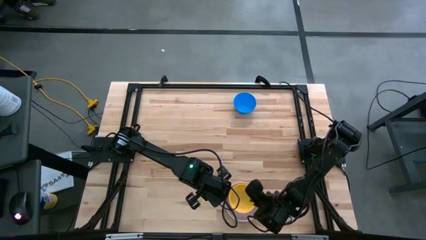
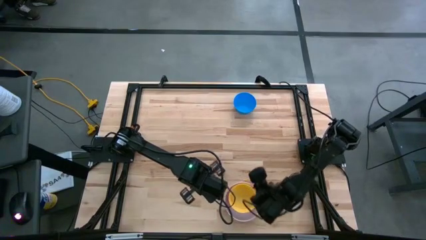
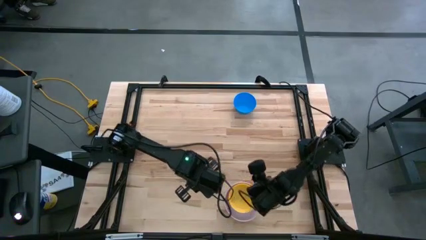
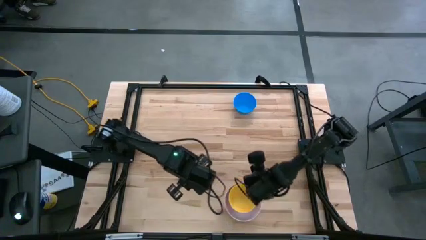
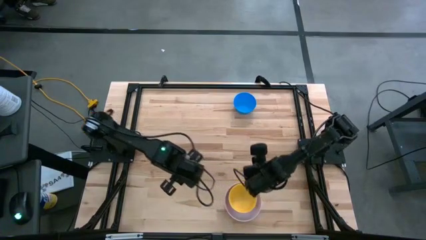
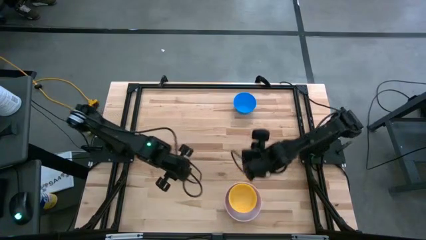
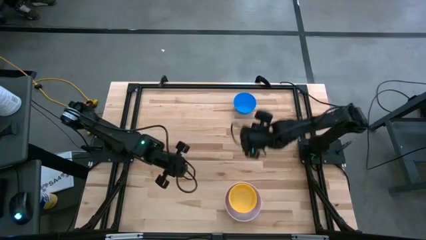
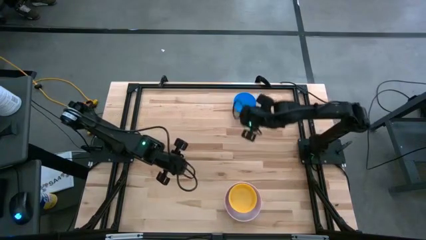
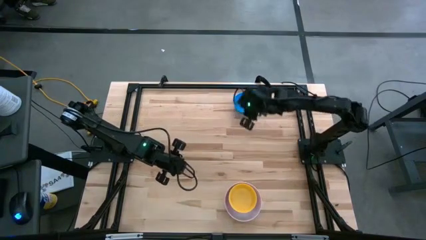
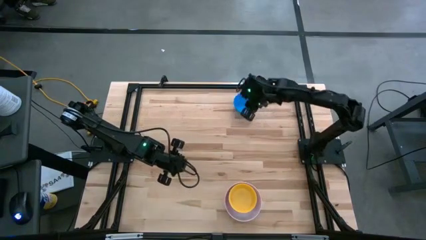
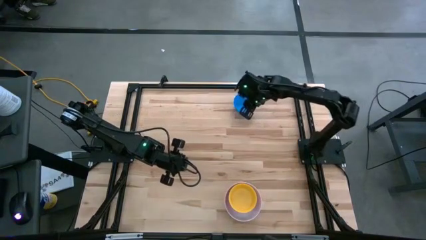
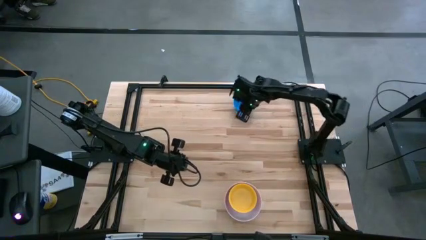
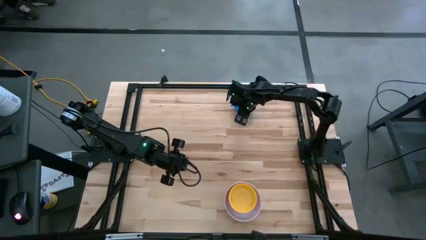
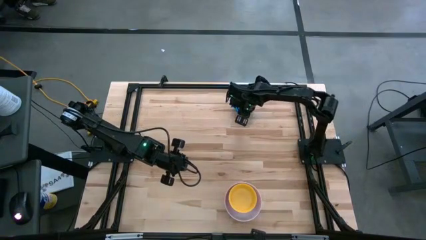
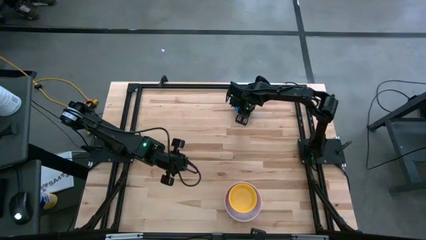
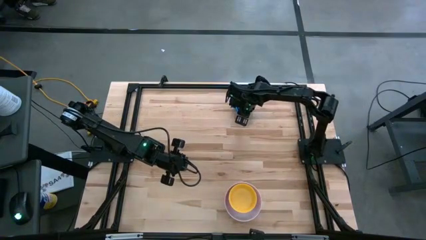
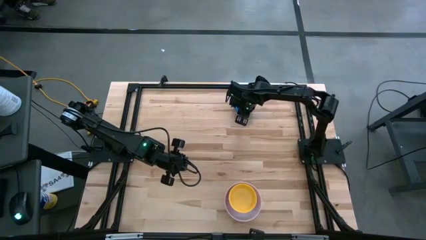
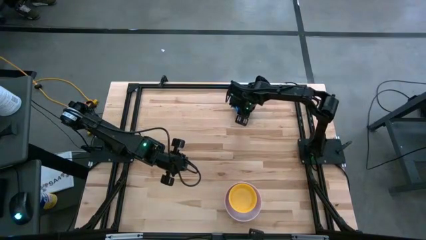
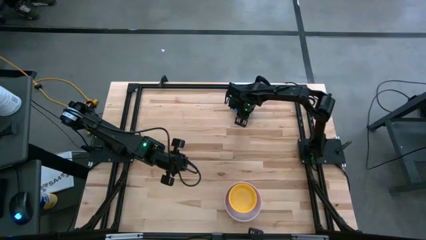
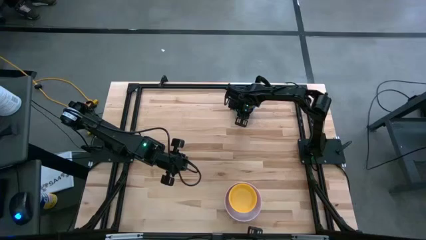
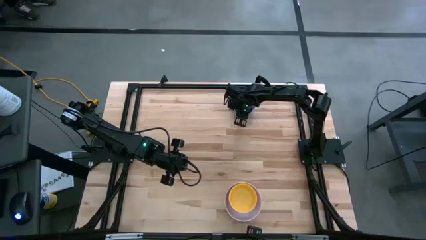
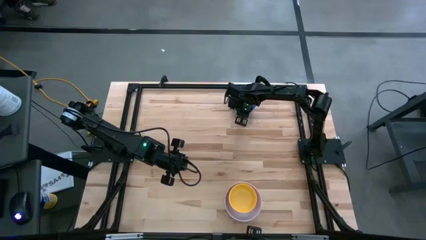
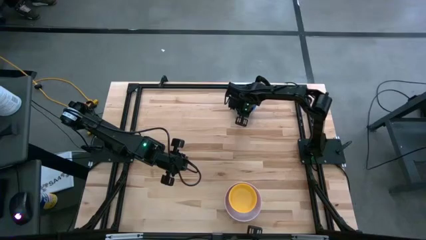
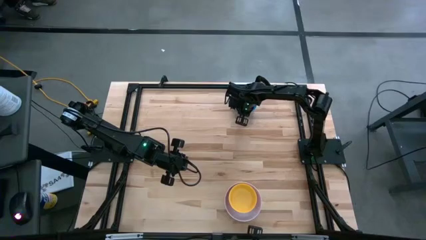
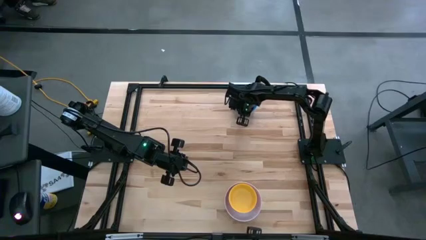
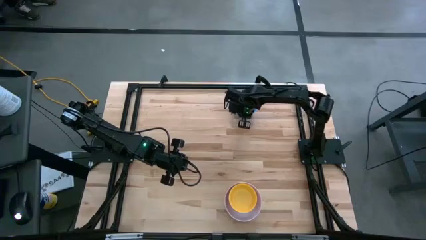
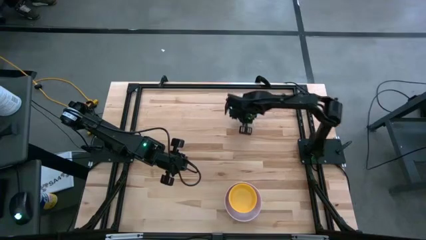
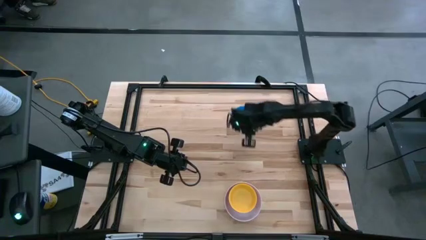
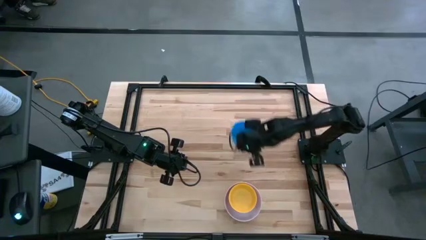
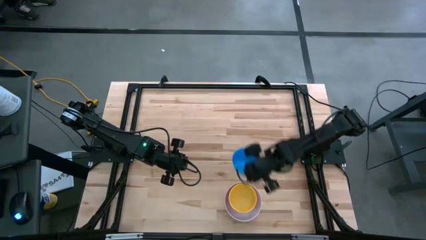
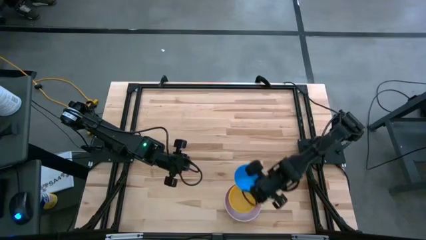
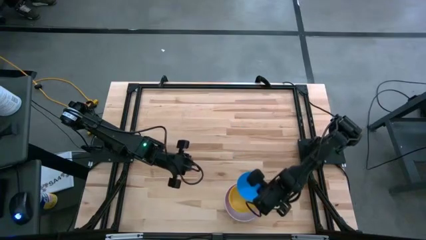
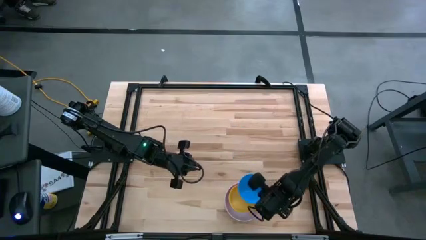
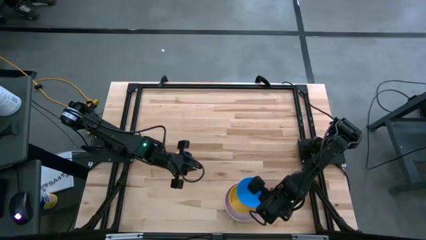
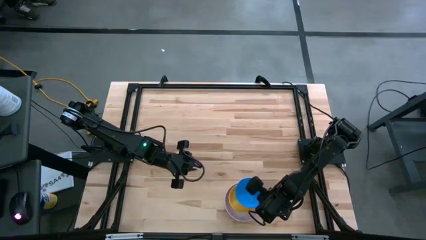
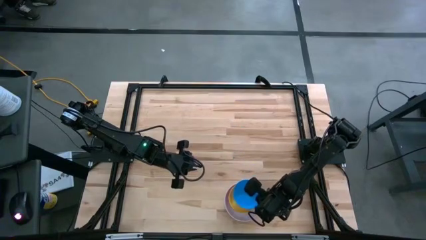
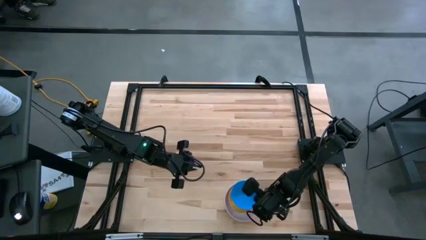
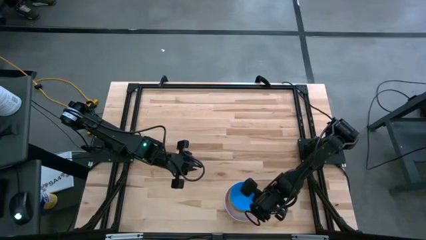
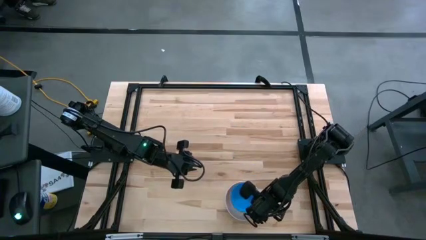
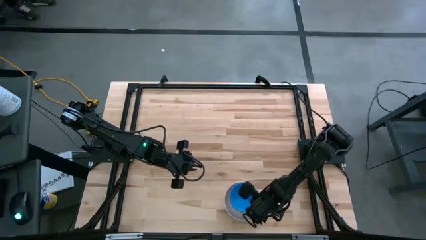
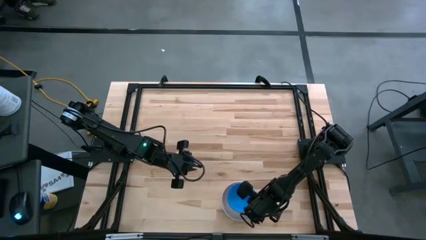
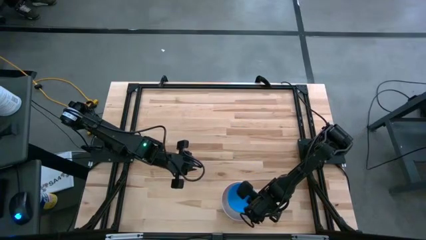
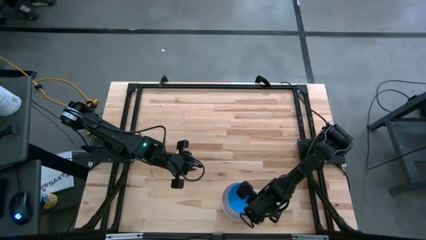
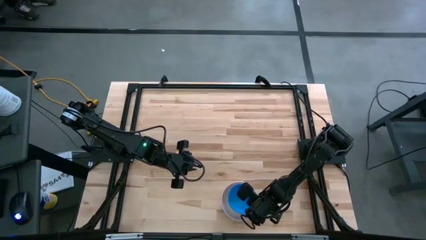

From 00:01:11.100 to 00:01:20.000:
Stack the blue bowl on the yellow bowl
